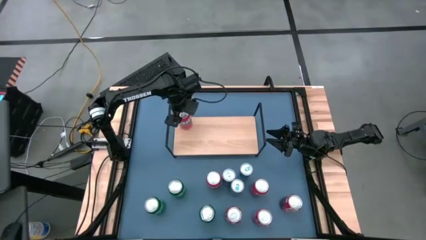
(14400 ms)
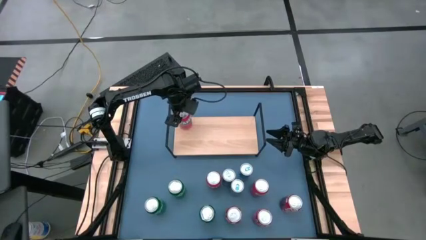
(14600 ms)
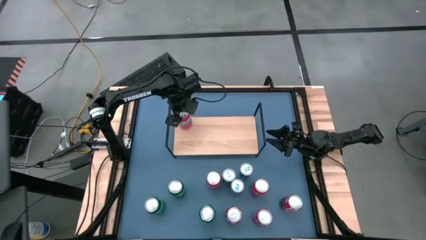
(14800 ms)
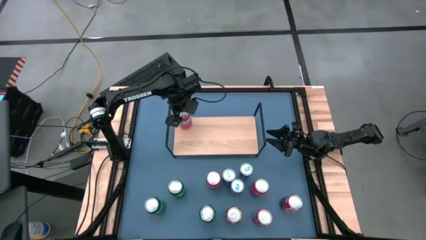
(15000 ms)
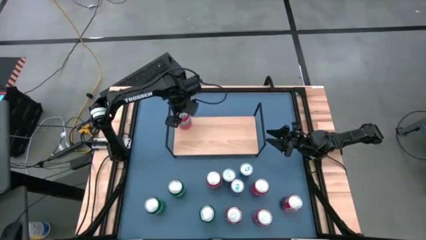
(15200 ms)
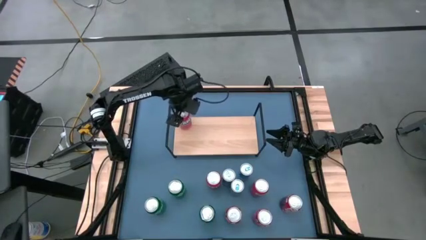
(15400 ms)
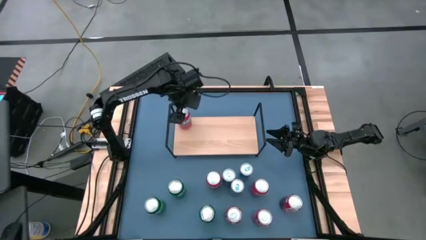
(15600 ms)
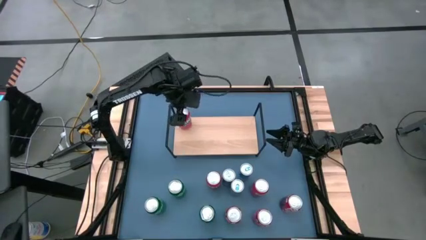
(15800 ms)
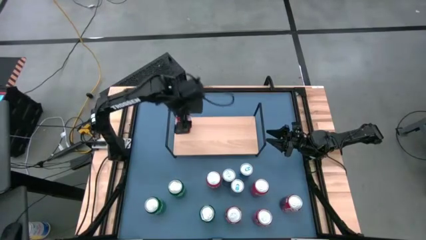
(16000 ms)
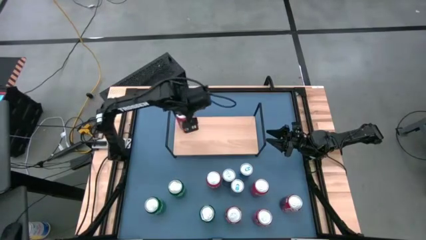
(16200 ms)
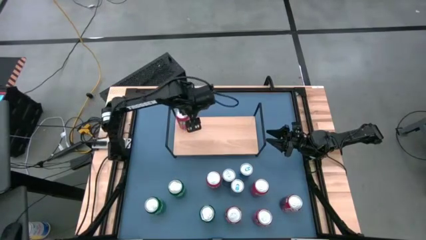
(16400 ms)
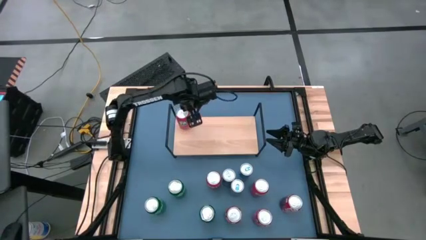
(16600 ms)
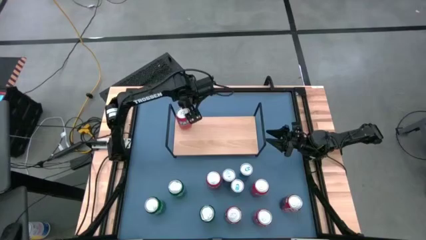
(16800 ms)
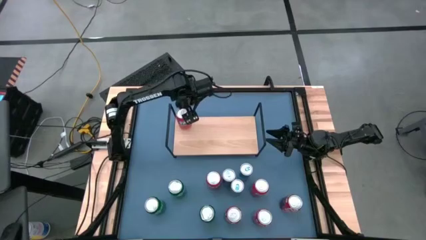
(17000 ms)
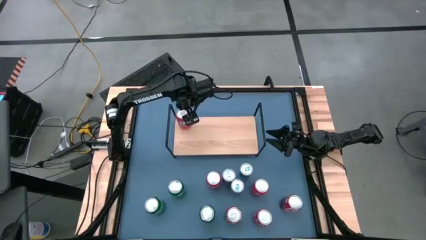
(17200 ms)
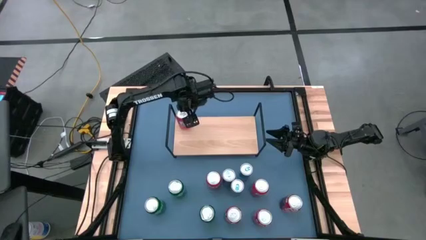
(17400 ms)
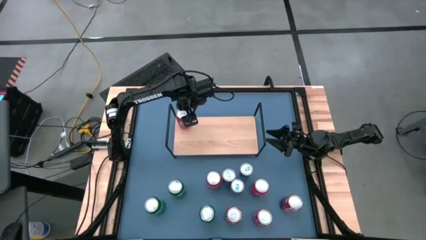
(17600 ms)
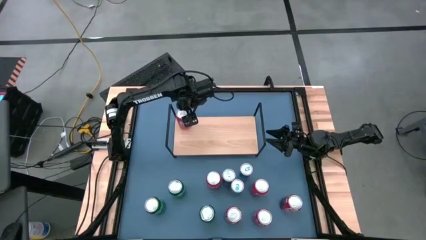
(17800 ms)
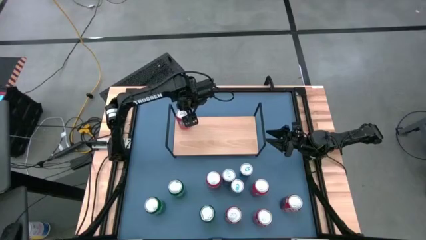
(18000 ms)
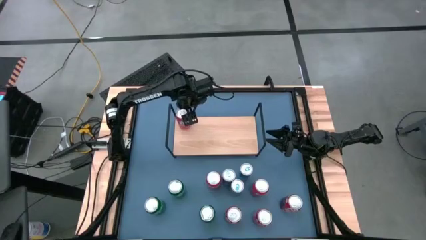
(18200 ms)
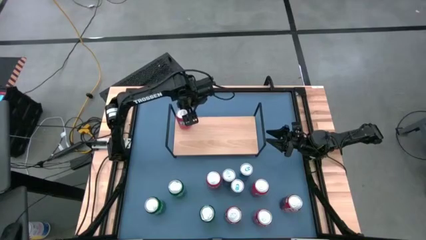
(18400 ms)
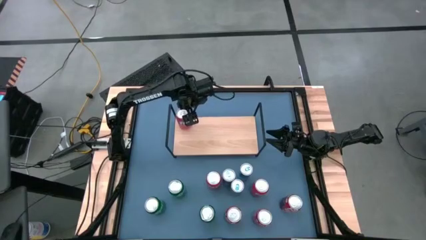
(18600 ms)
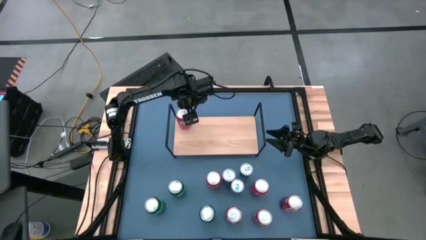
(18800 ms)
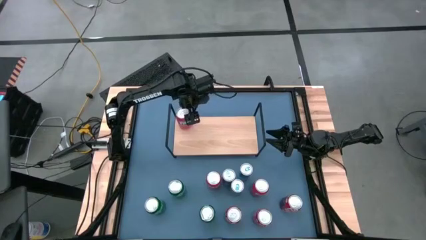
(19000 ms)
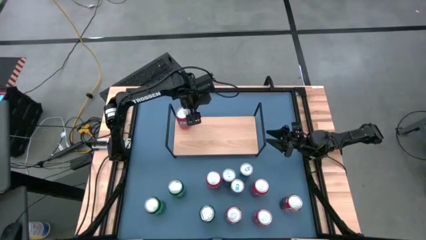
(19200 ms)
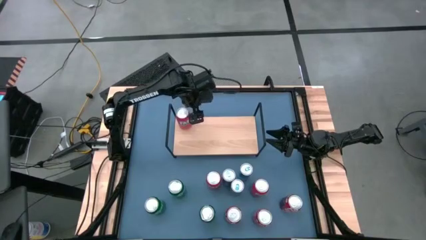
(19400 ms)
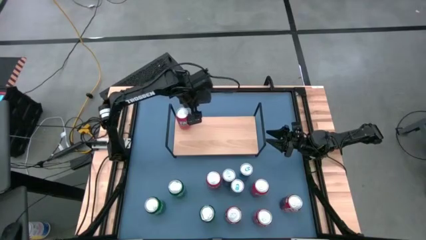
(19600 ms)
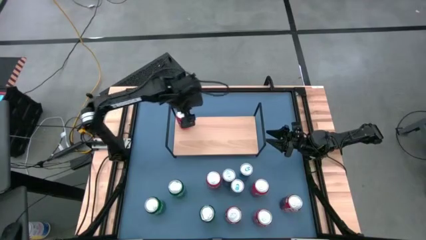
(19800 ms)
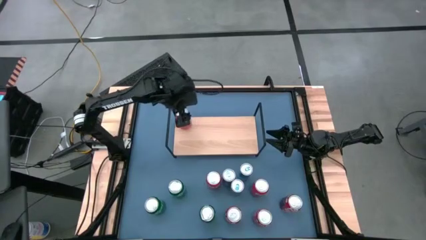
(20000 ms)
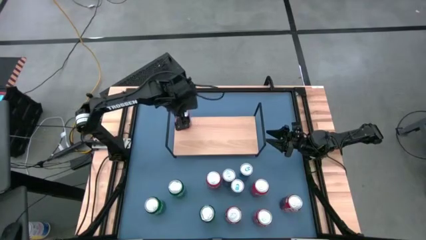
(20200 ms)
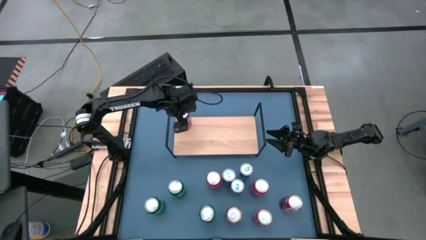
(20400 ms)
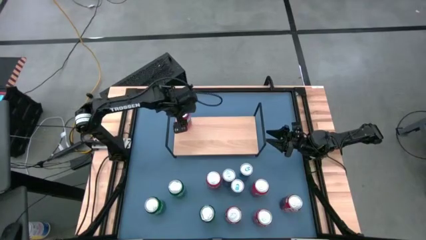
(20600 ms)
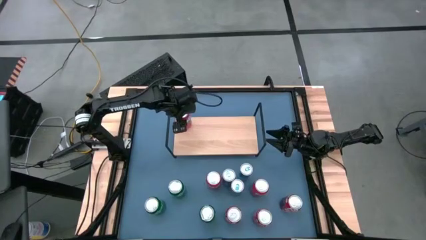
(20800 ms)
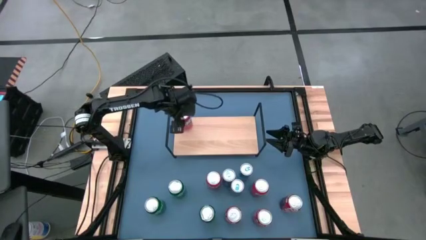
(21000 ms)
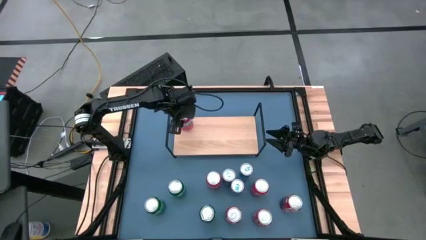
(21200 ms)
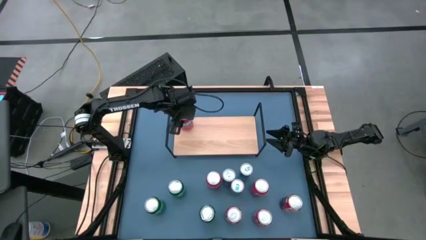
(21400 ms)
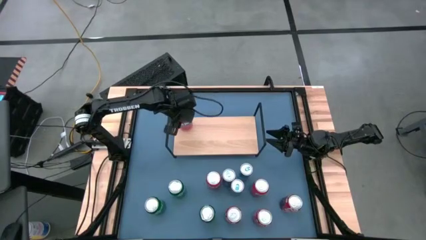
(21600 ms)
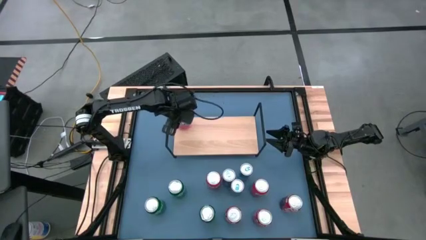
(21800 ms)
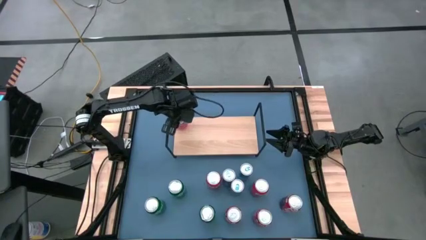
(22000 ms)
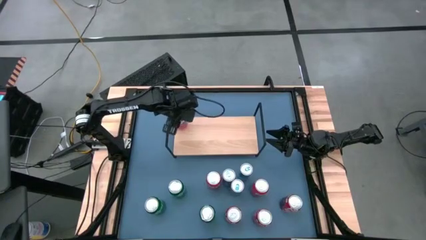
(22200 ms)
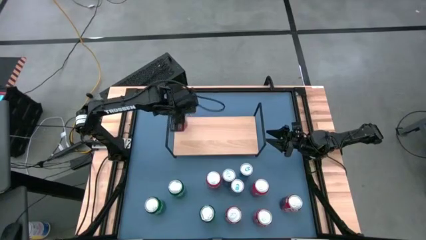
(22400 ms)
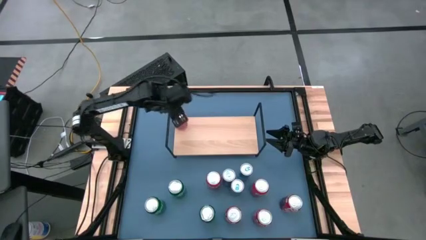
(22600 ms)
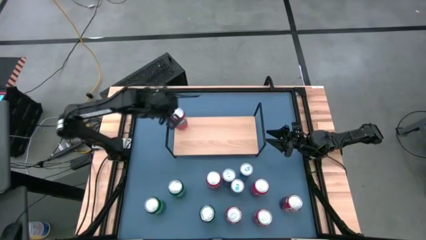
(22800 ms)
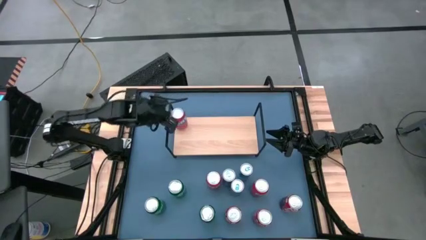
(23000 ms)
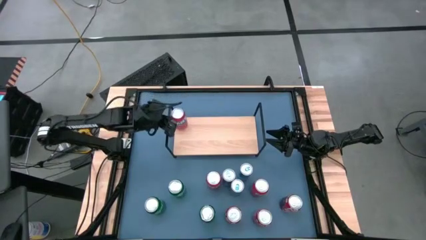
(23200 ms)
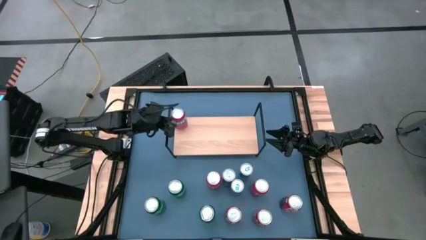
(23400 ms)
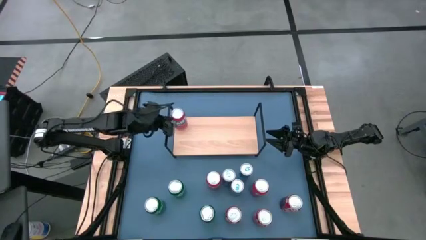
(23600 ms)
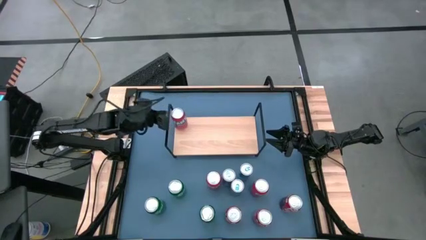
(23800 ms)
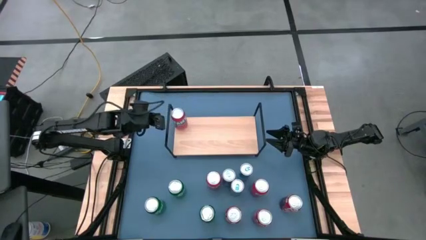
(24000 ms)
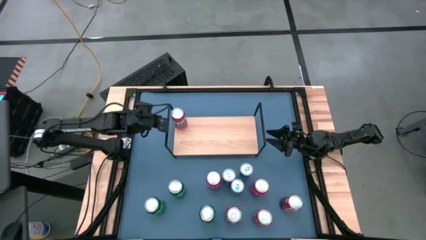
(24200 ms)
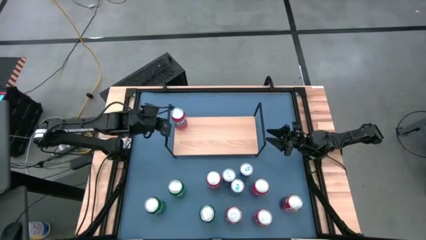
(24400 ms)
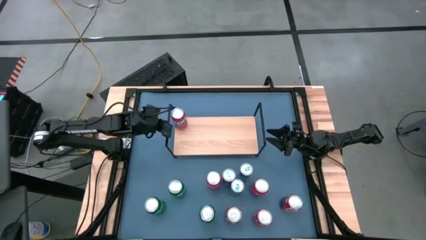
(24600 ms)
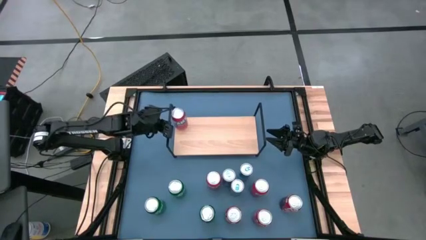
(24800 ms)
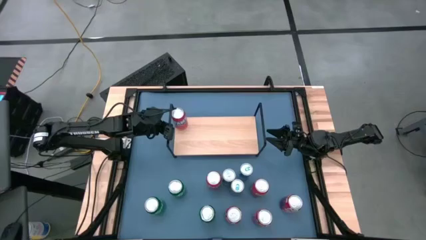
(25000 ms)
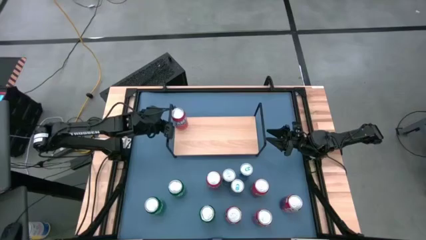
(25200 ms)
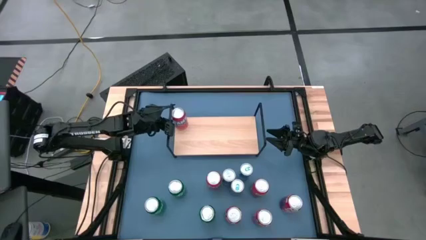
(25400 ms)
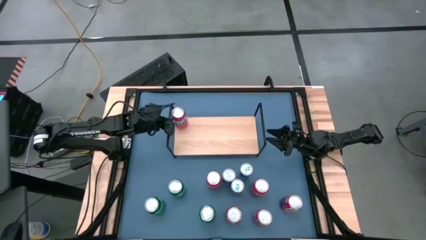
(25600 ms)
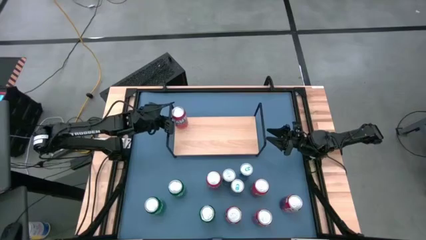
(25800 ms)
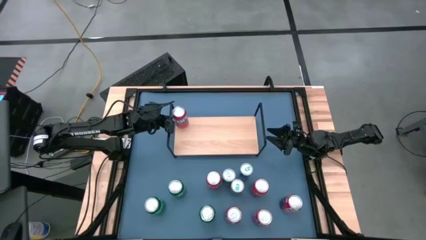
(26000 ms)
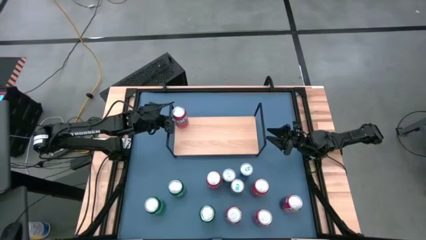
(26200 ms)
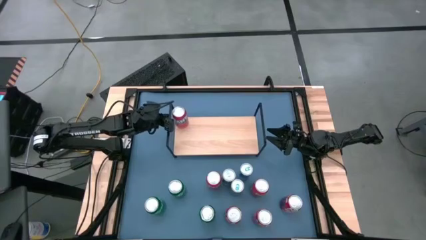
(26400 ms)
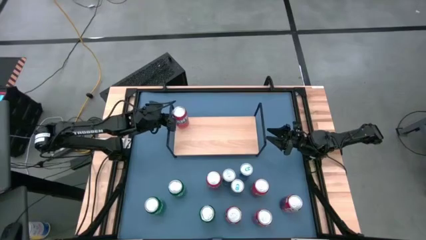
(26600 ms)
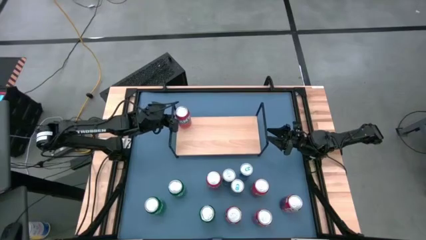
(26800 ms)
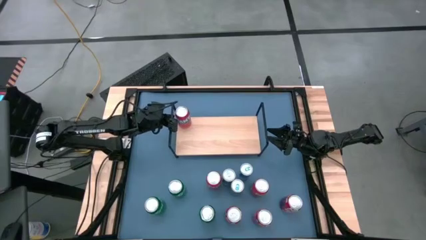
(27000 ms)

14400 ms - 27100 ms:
Task: Place canned beverage on shelf
Put the orange soda can on the shelf

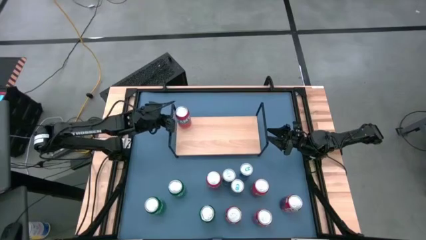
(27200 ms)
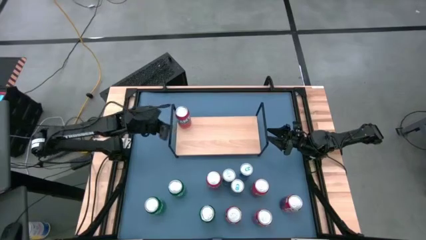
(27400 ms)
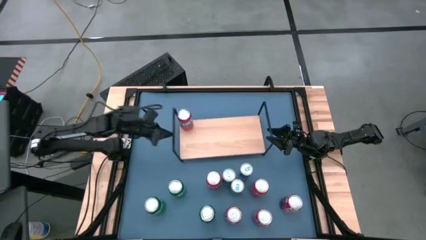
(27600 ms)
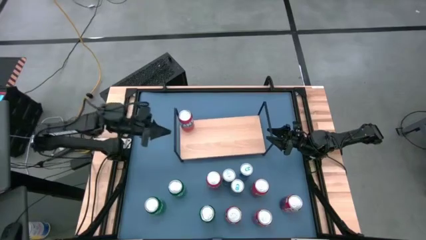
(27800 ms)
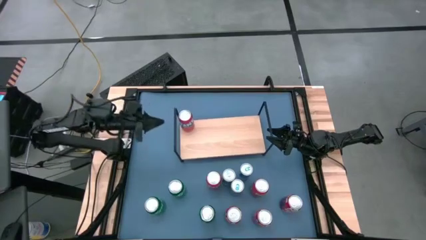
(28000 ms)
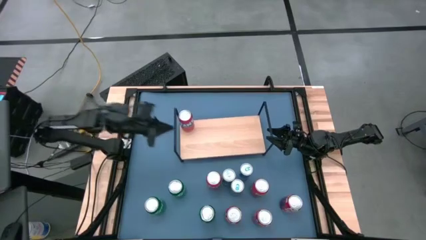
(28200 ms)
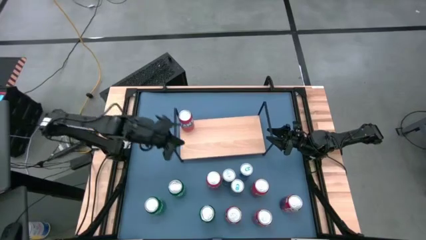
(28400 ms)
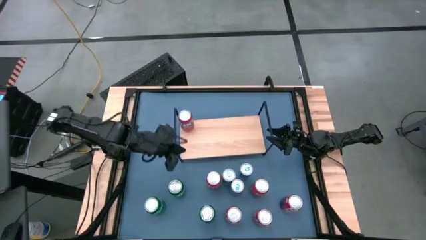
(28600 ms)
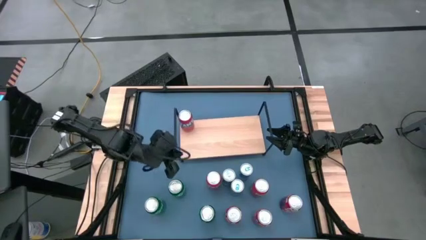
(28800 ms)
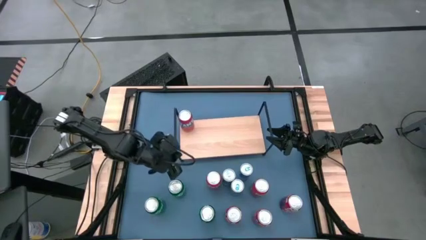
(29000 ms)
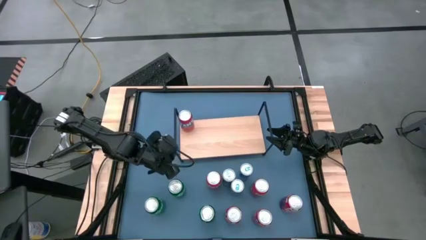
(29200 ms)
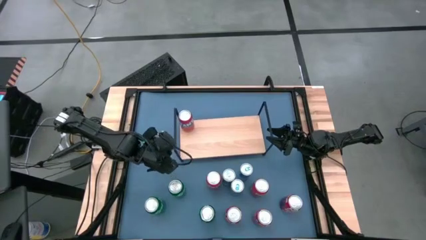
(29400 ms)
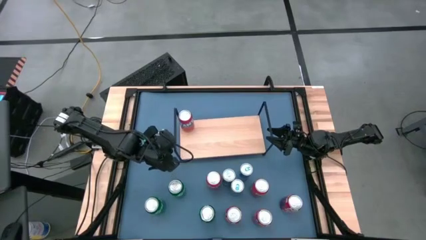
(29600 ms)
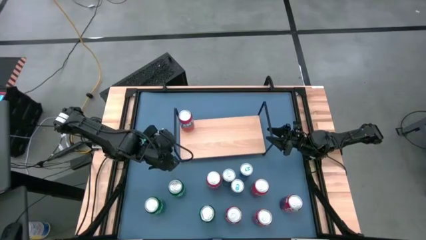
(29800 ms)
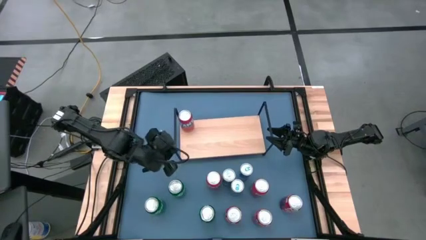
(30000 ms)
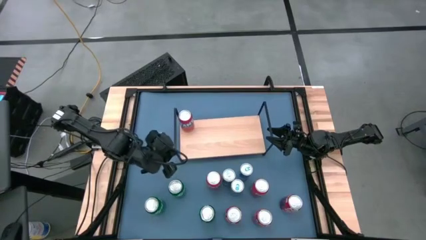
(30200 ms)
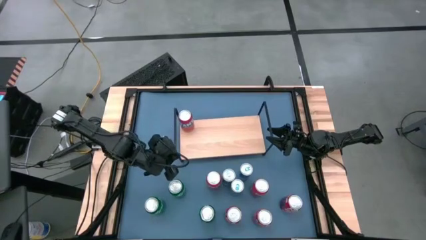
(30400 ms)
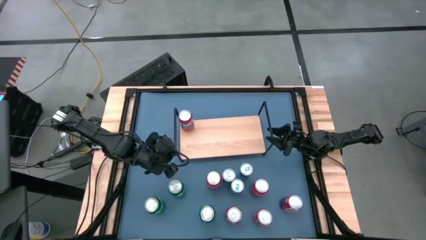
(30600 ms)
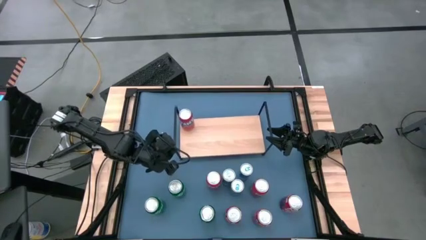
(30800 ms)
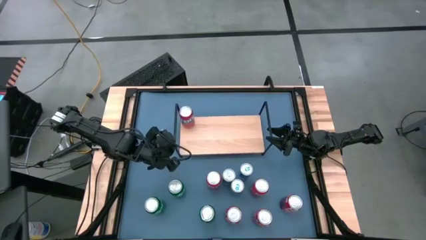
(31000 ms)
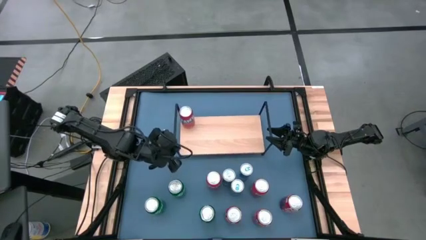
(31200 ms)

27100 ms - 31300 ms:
Adjust the shelf
